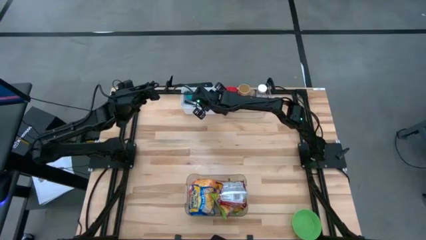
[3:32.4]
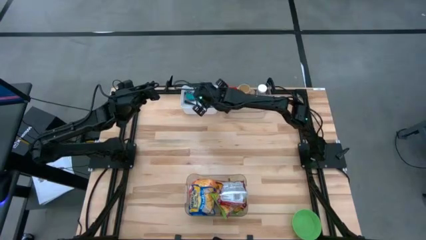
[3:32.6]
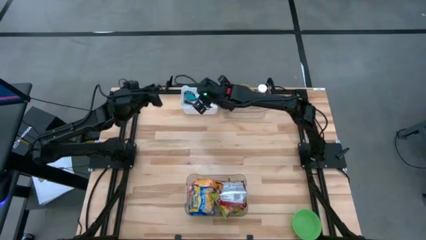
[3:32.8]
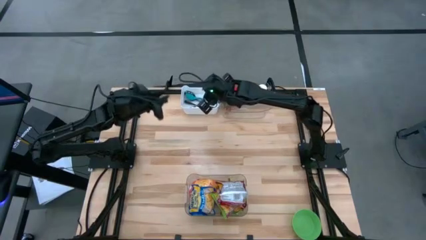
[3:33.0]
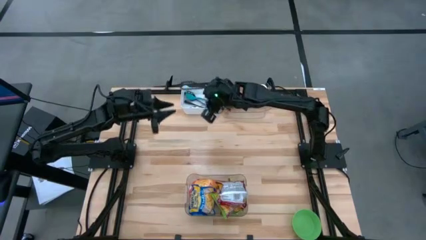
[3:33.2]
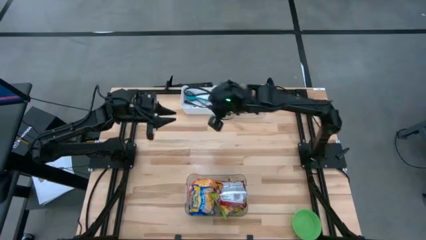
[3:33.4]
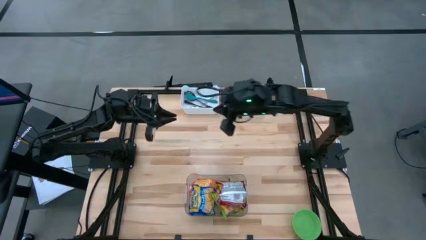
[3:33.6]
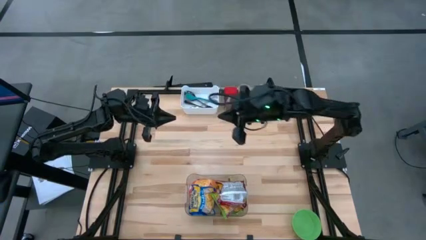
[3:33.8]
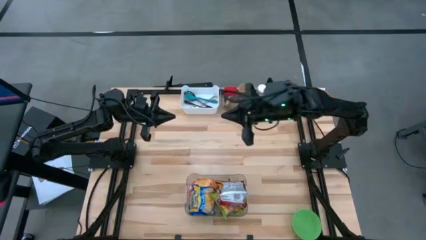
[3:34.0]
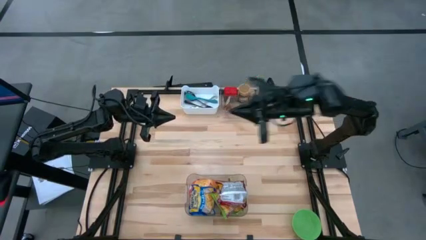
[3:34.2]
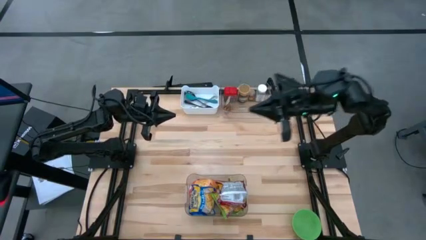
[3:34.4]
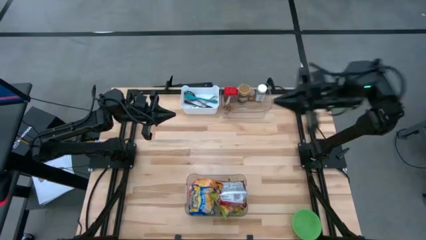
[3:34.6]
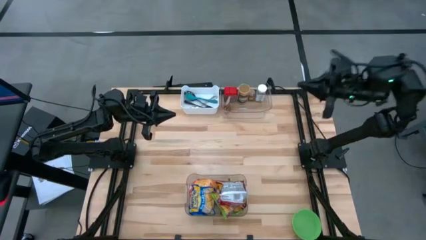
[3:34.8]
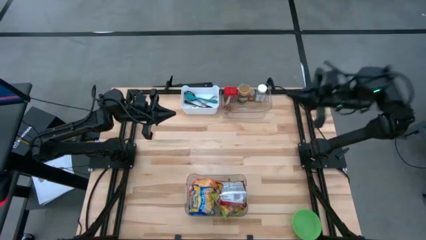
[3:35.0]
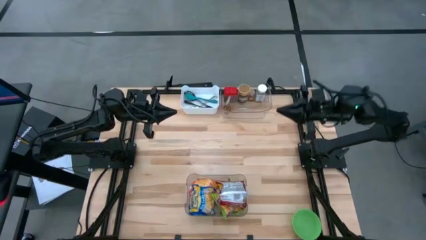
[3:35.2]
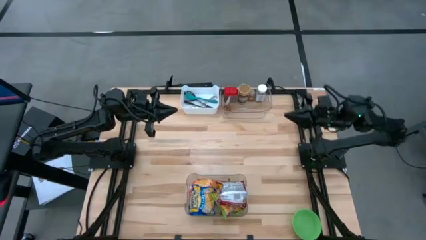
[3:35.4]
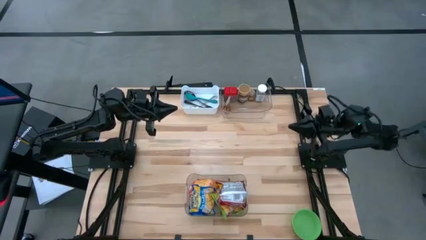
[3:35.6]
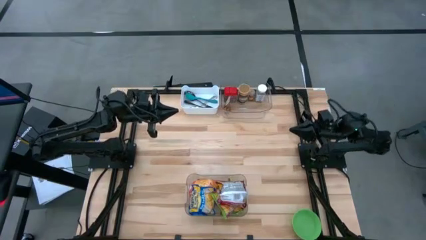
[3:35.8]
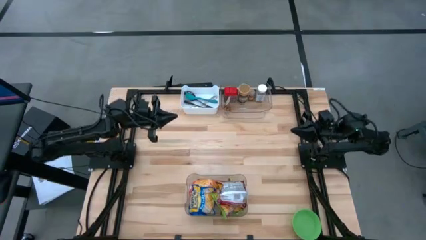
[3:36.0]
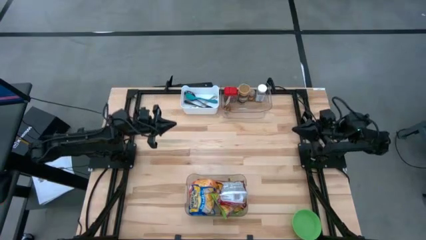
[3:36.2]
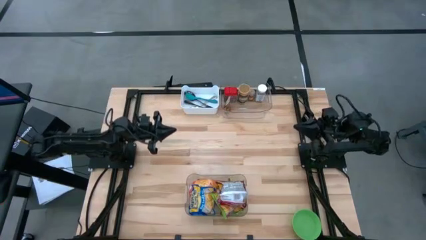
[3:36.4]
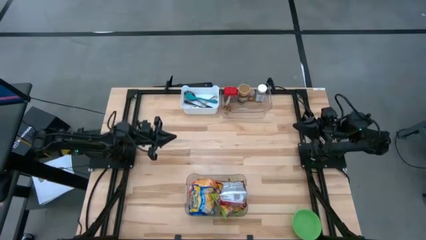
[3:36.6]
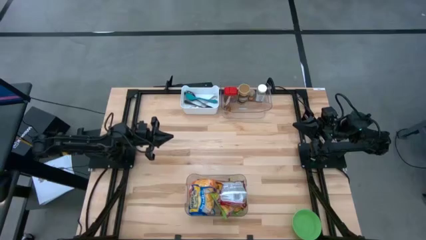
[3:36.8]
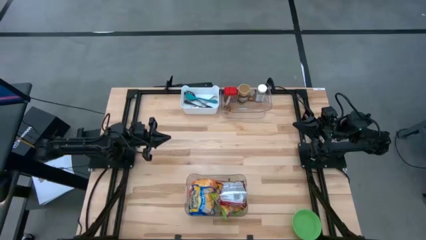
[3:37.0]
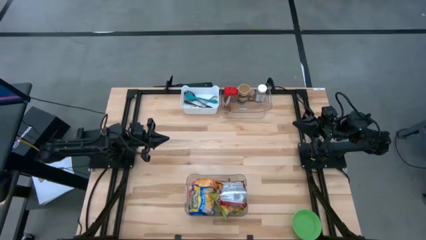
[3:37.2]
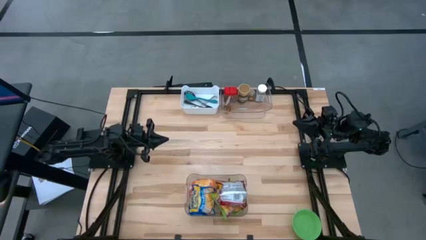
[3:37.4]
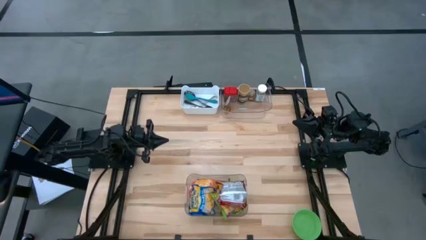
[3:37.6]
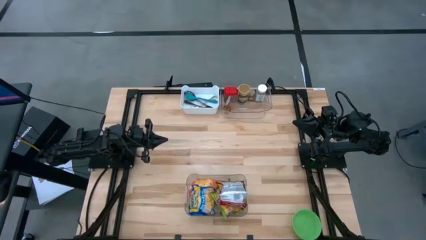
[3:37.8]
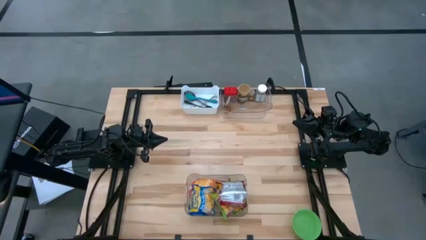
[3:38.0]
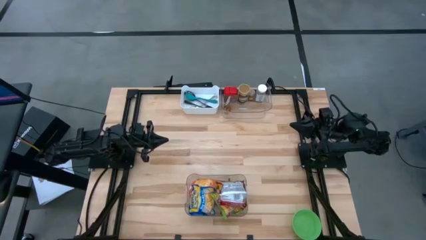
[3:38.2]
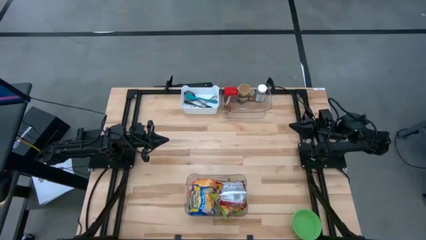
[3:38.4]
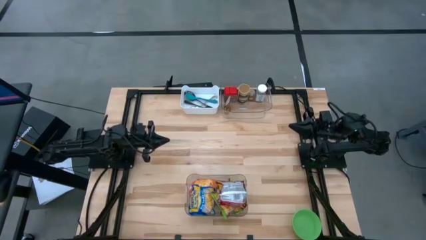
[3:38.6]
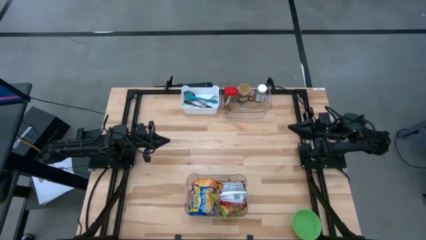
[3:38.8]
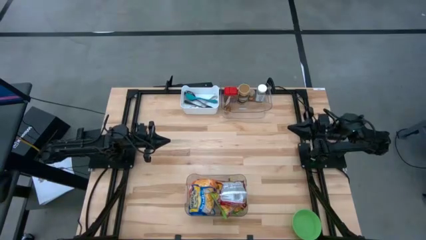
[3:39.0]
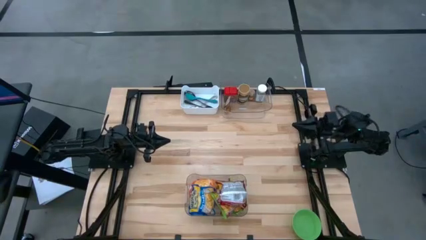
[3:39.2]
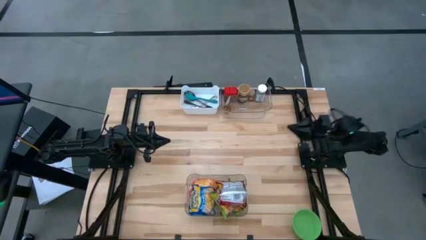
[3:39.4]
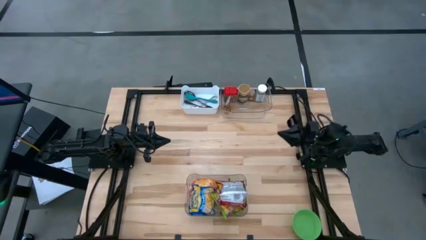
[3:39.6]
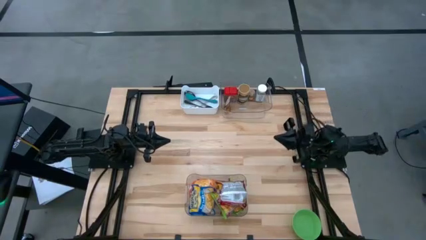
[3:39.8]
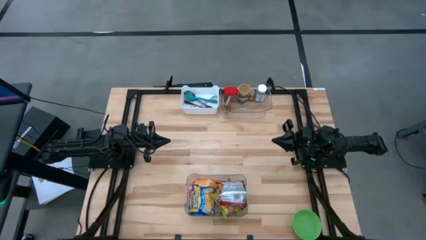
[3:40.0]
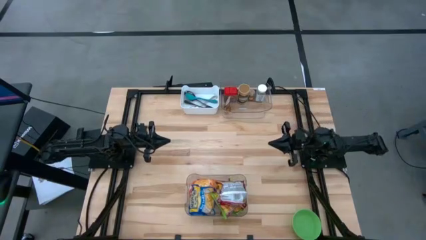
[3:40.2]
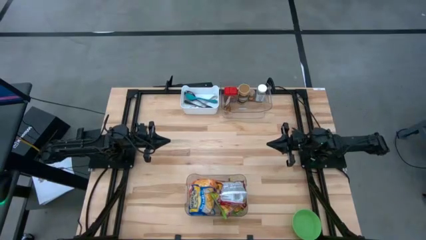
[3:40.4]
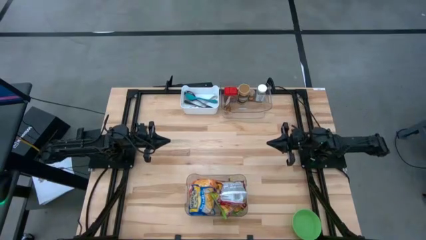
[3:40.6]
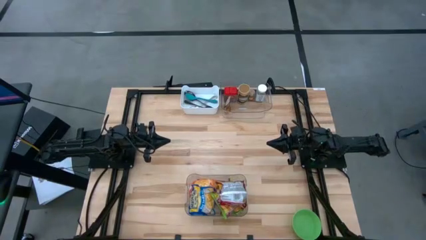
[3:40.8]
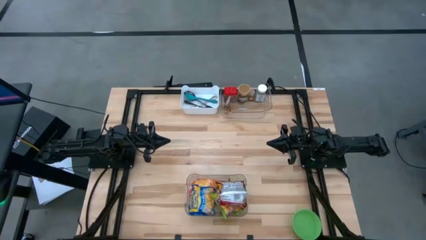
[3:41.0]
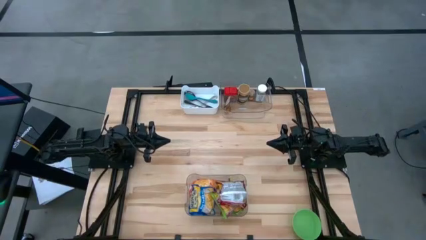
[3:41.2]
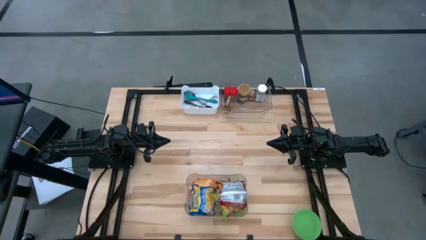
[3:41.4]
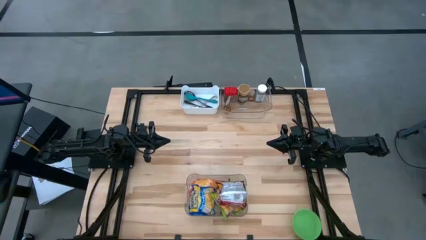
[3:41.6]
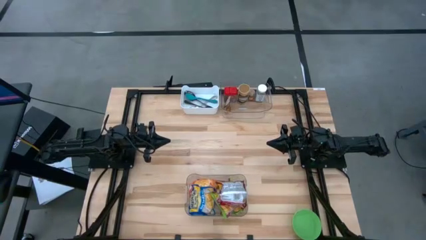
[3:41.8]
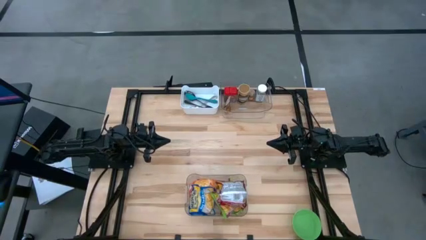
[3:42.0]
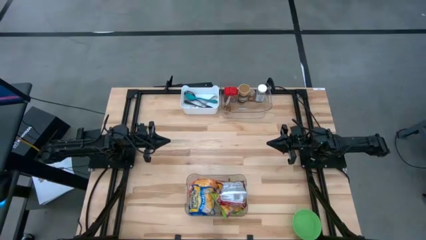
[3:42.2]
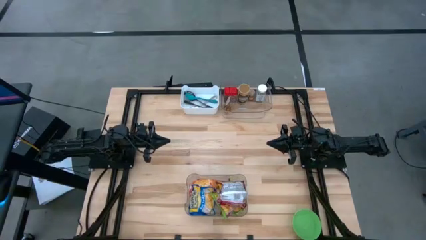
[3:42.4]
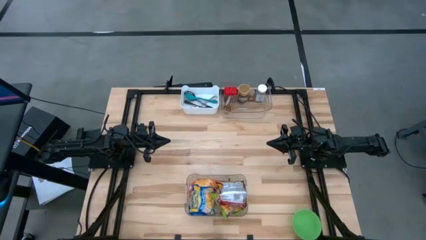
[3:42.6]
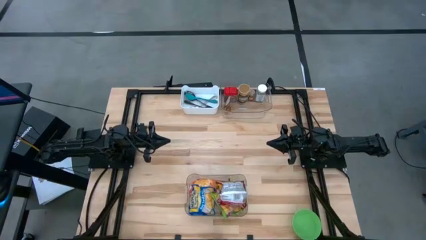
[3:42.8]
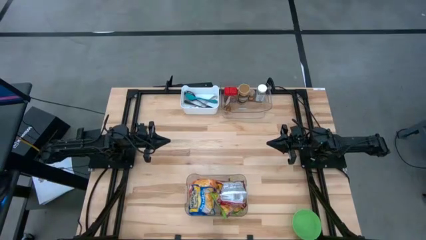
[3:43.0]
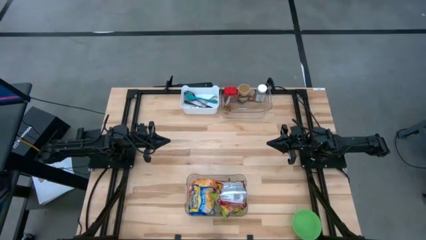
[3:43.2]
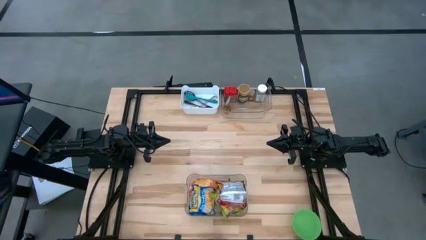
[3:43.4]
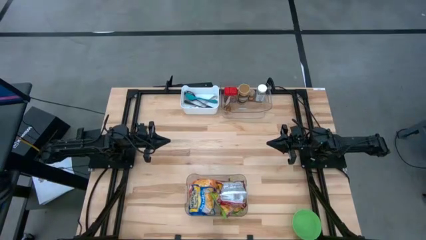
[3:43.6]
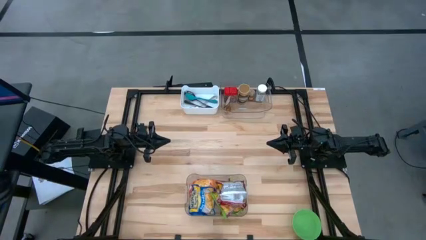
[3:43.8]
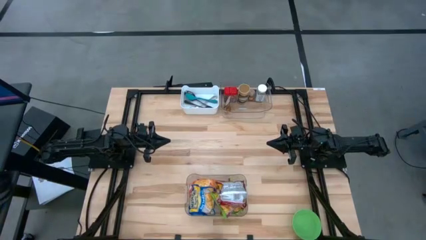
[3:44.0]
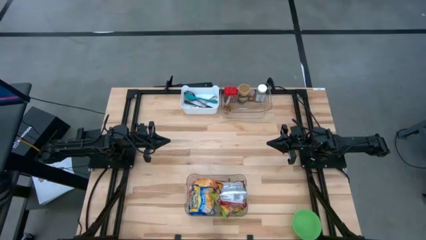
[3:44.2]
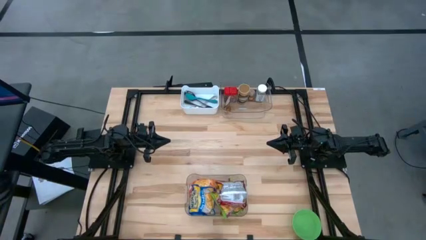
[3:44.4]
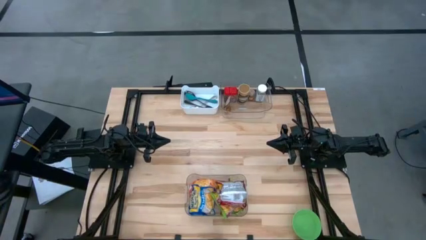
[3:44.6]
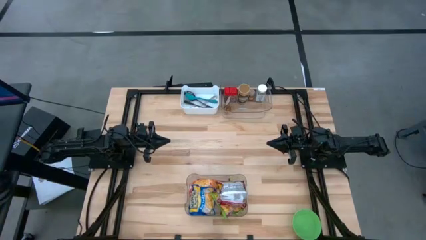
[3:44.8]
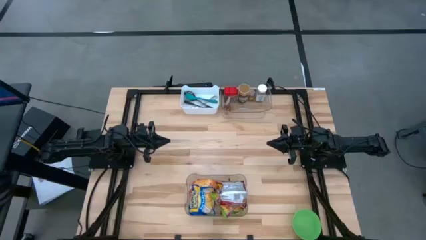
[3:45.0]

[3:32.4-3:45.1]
Task: Pick & Place Food Item
Return to Home Position

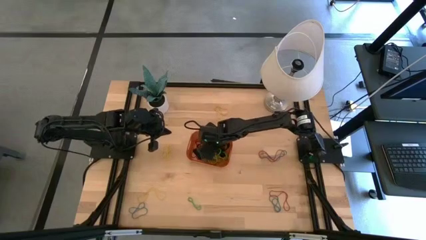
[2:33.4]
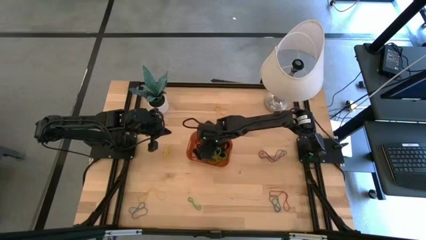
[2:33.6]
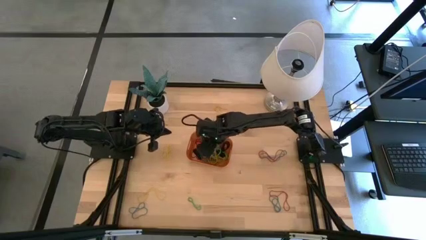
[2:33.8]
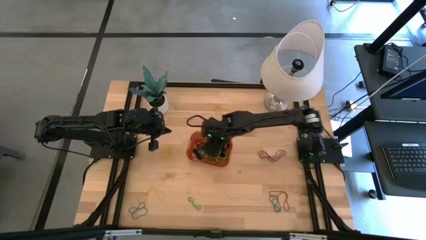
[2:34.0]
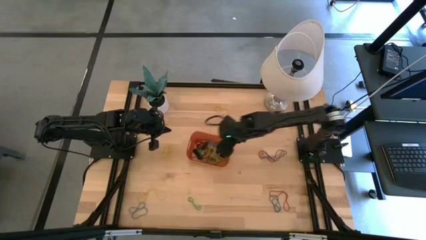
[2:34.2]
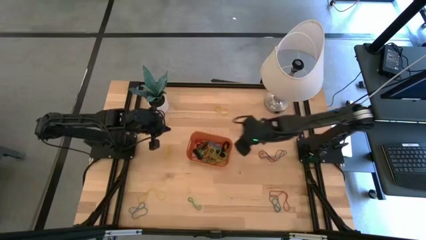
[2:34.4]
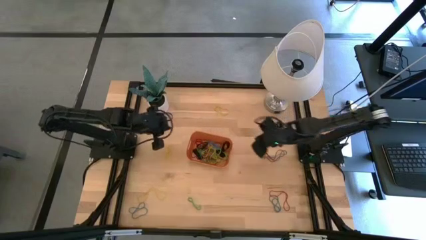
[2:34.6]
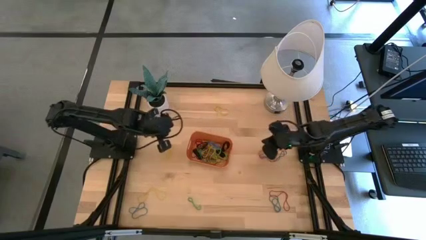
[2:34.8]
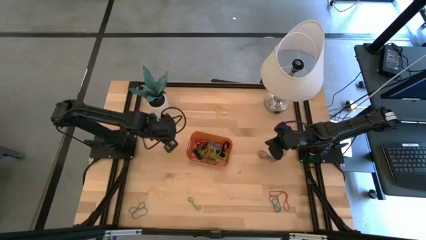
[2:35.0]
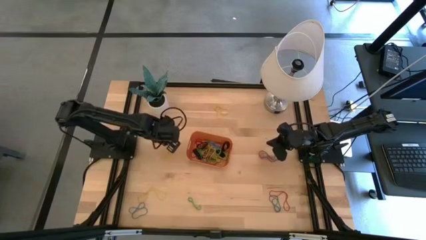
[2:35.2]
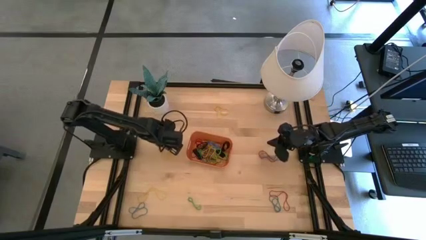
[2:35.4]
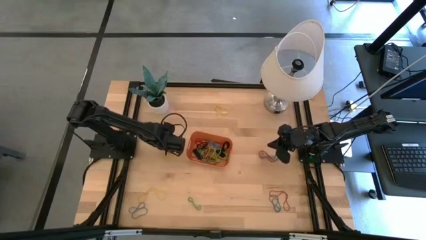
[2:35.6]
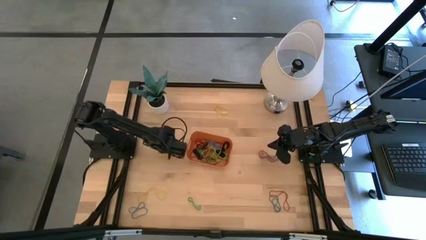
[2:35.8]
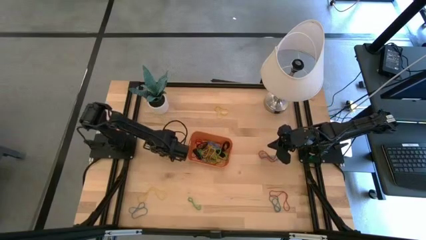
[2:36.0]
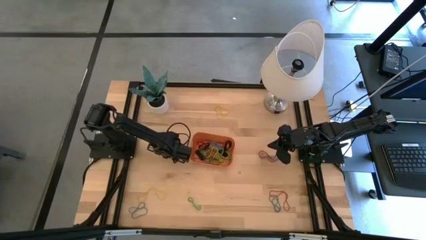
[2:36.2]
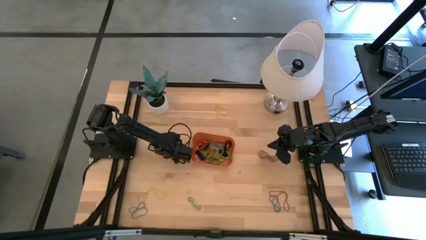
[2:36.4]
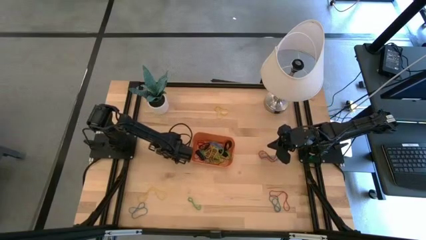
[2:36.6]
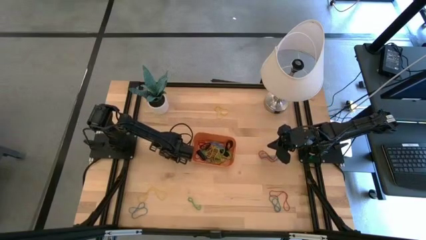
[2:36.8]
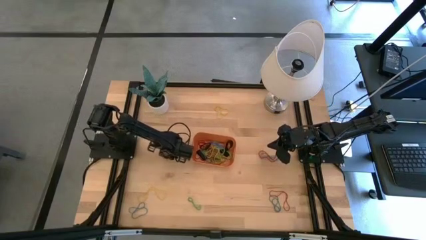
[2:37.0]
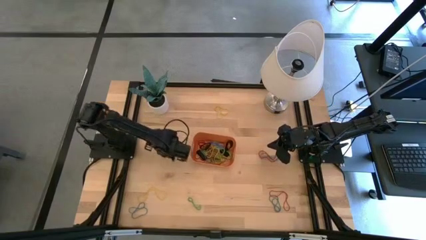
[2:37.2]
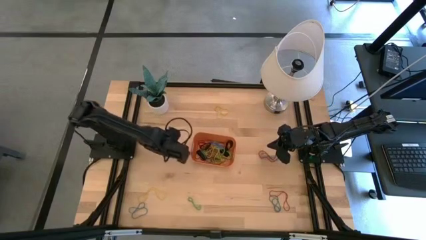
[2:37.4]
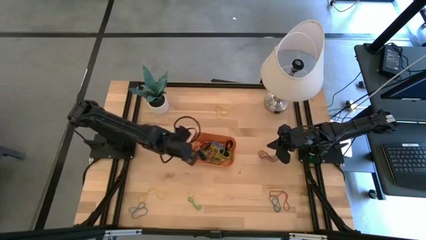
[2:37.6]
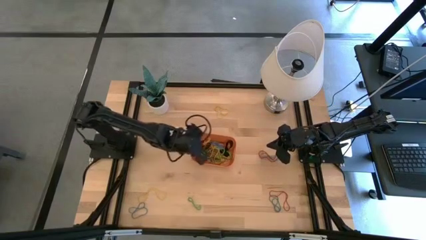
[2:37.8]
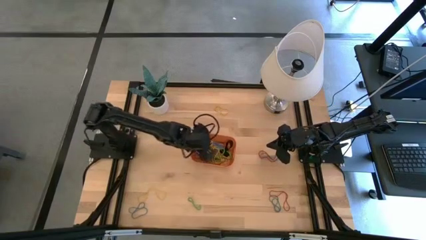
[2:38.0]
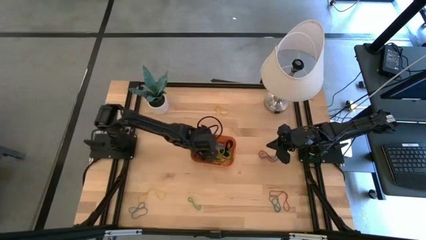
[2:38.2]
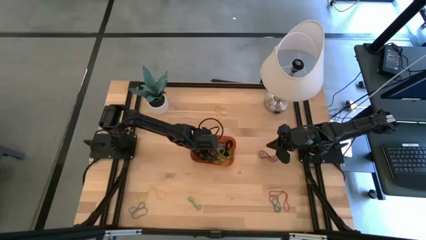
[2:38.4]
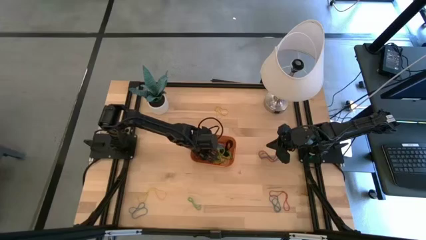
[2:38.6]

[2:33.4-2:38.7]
Task: Pick and place rubber bands into bin
Put the yellow rubber band into the orange bin
